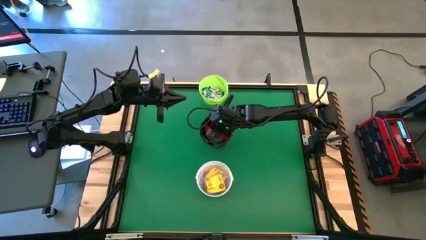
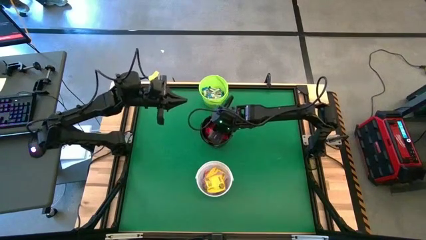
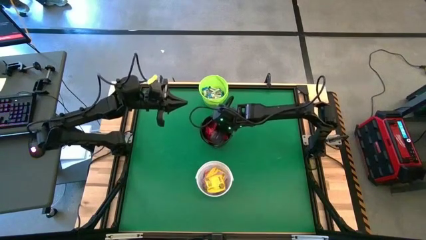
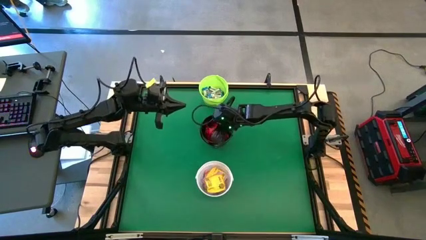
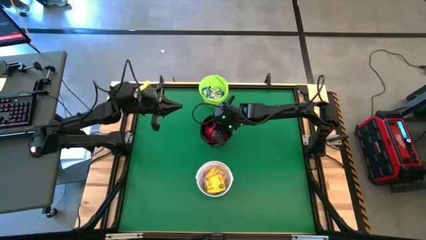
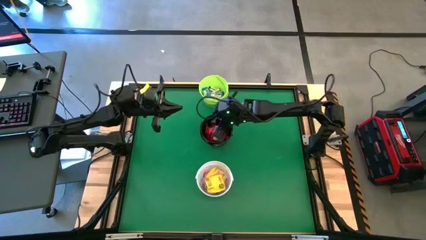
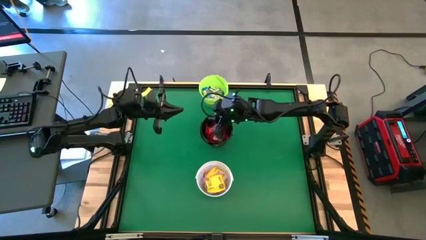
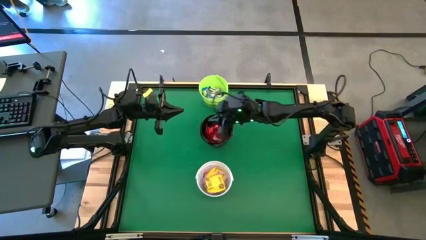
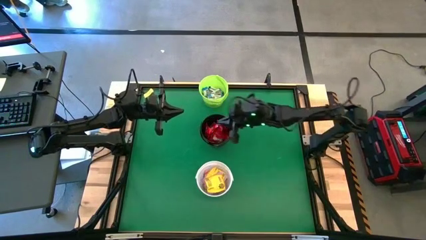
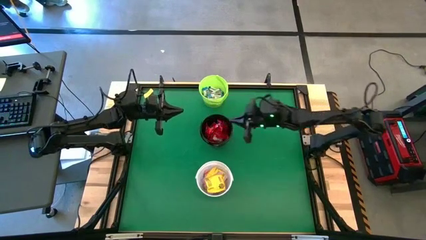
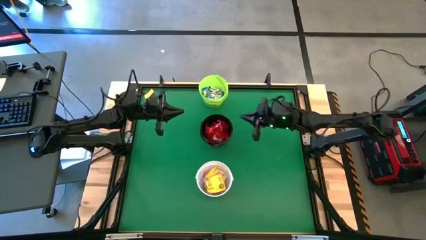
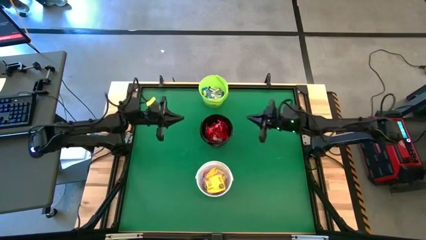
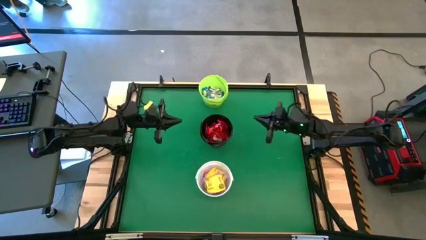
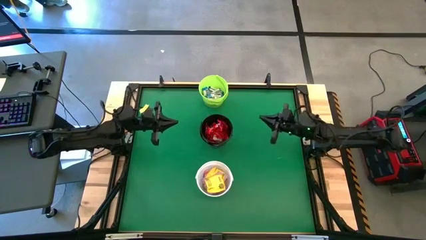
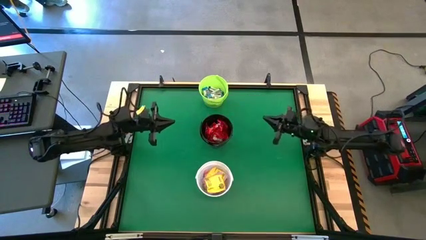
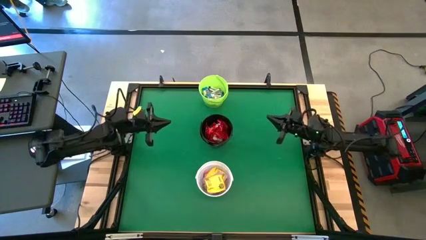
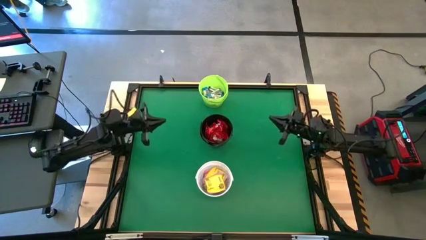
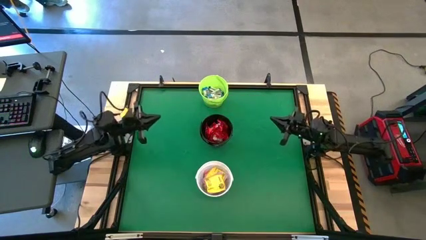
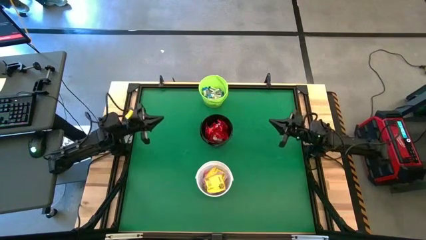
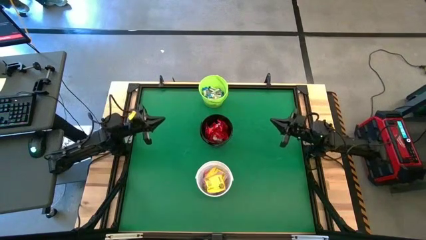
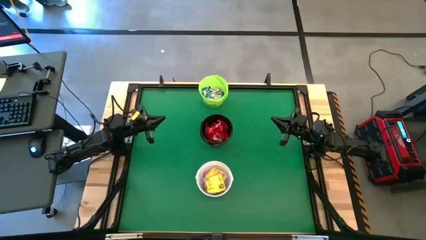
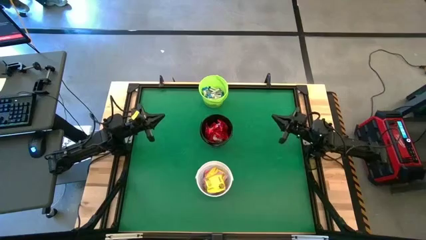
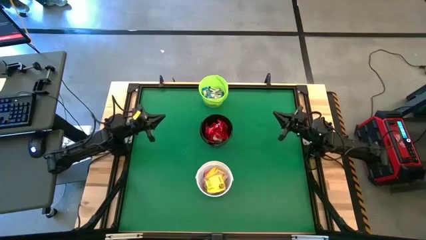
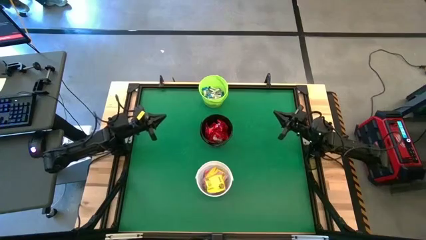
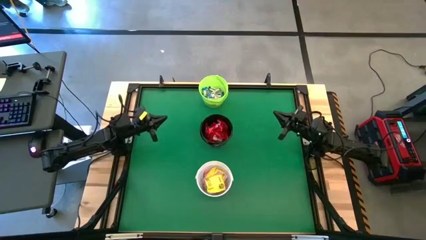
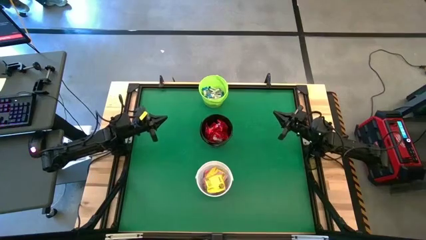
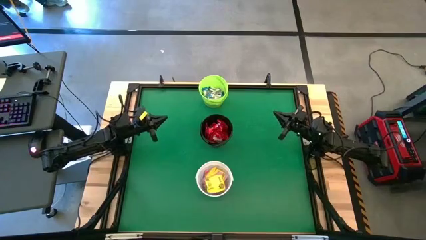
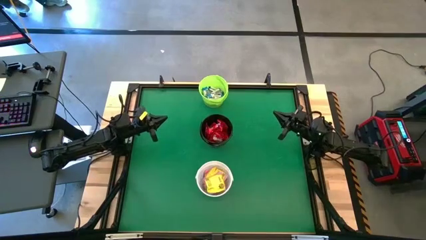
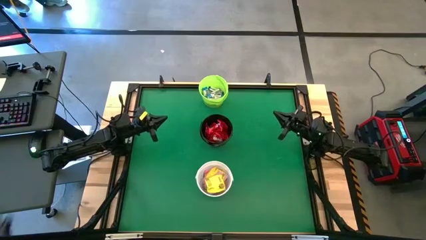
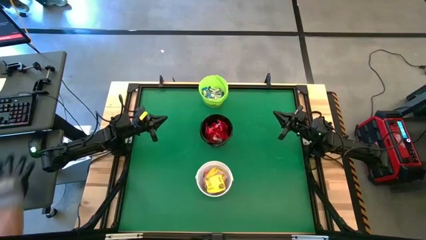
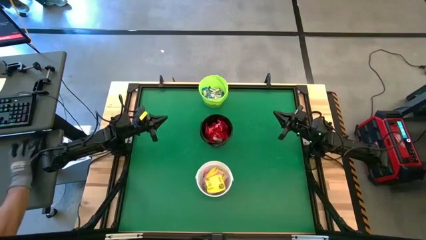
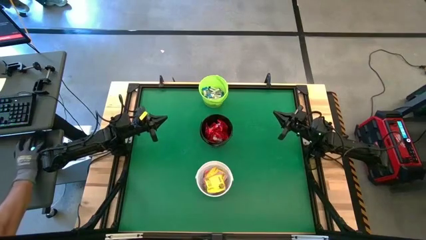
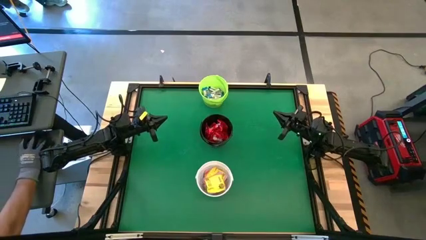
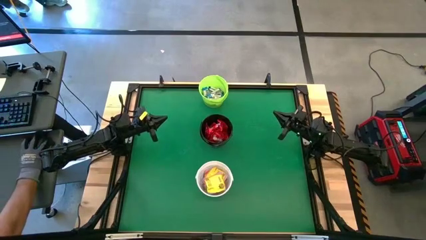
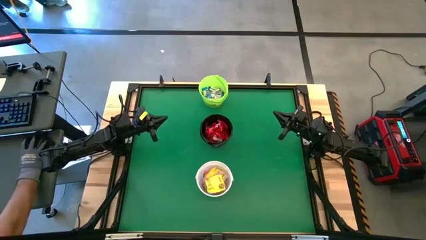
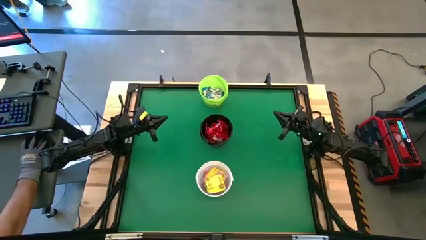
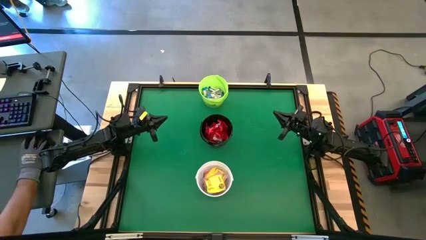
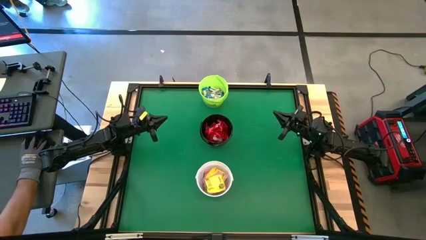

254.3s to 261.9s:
Task: Sort candy by brand, put in halloween buckets
Return to Home Position

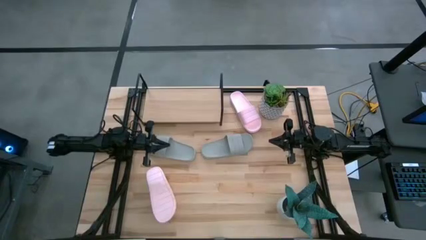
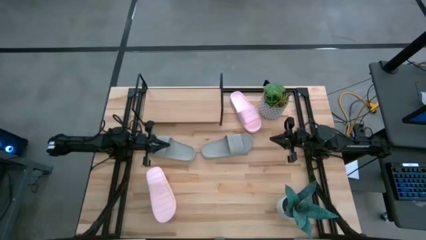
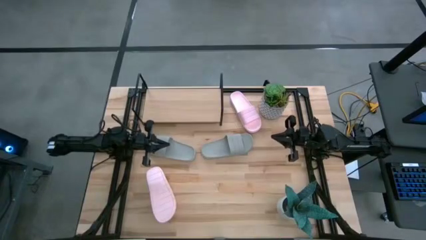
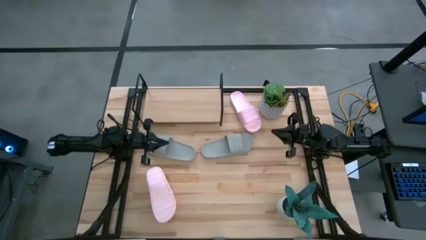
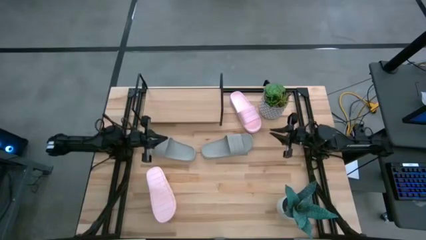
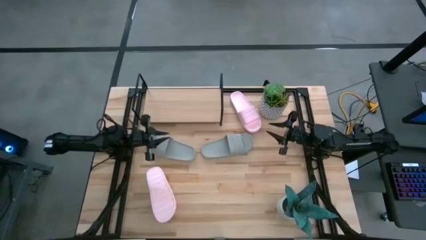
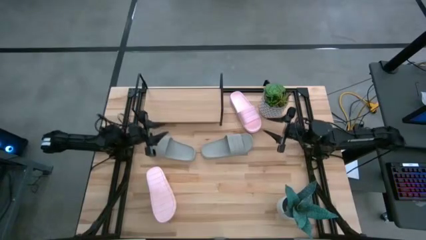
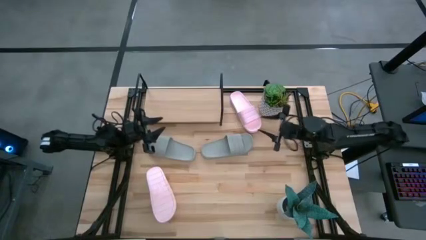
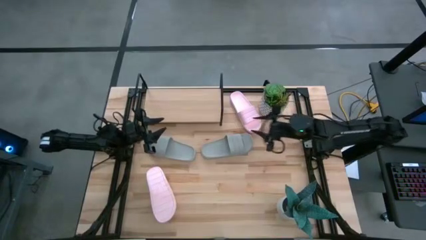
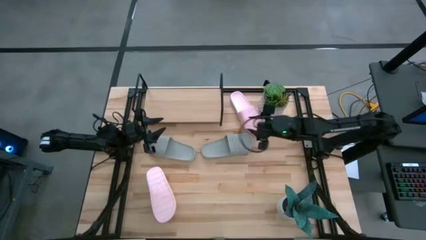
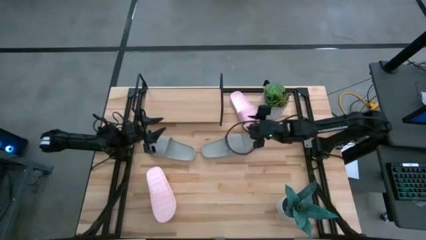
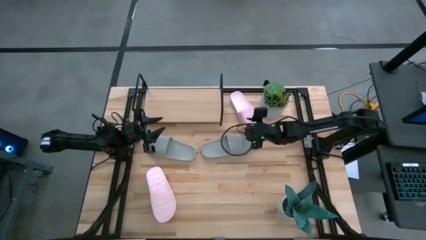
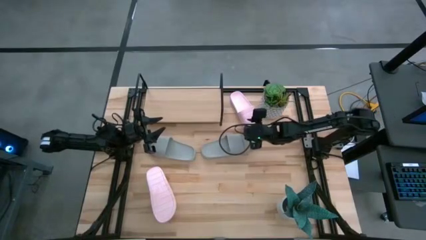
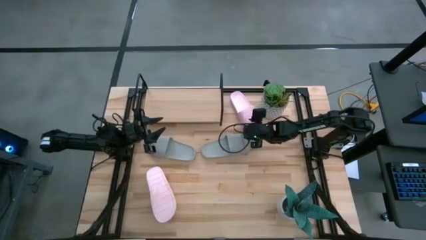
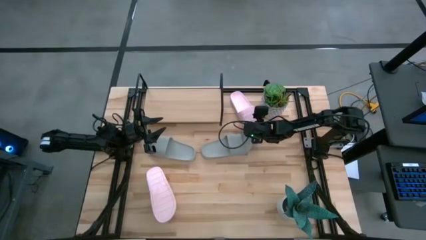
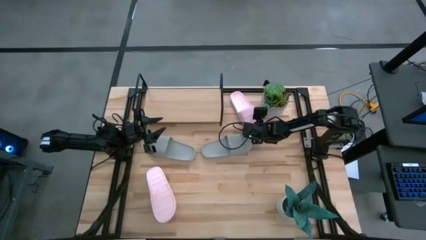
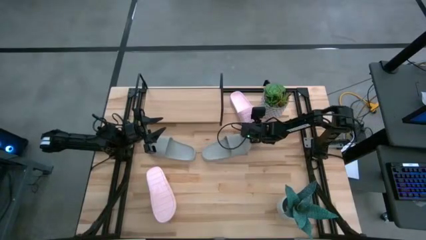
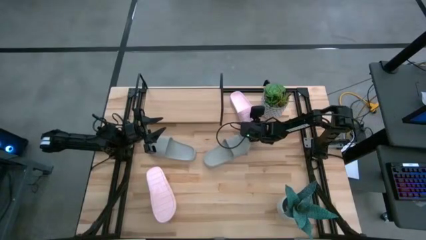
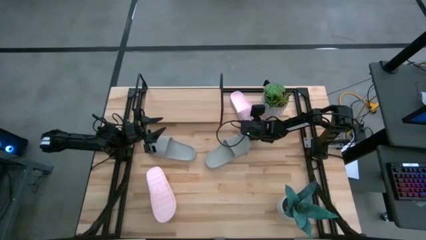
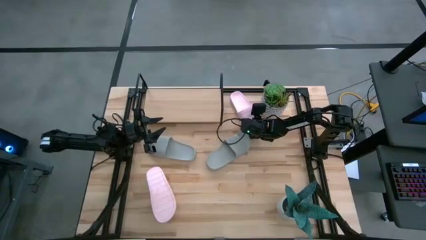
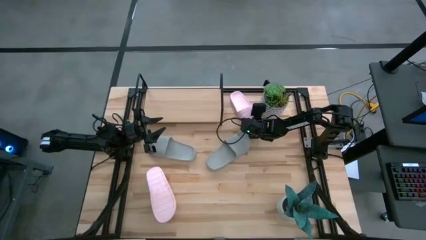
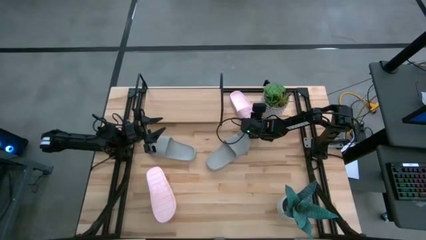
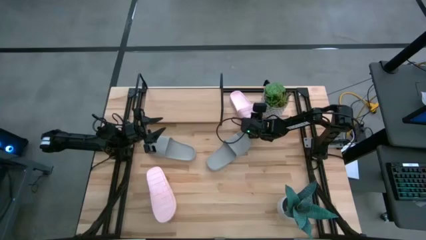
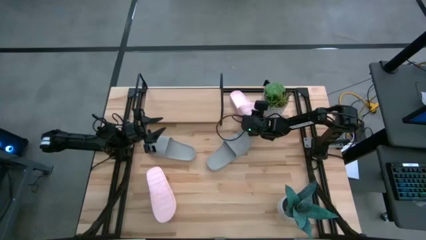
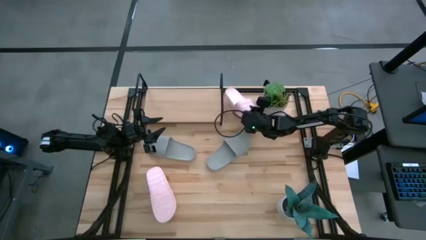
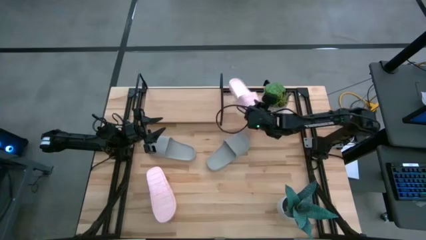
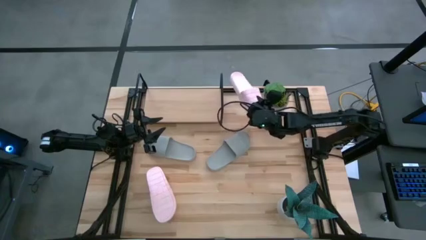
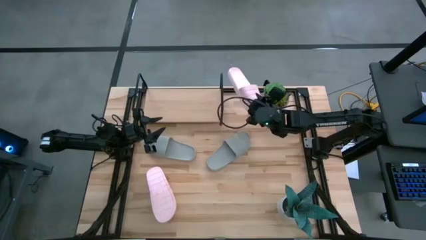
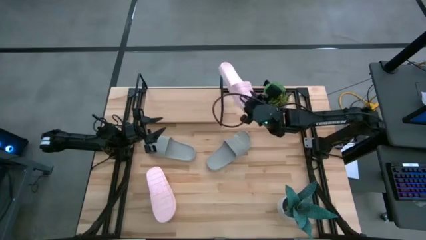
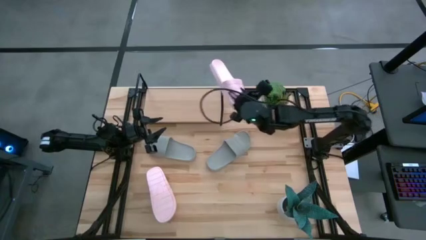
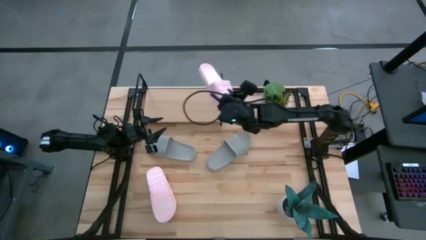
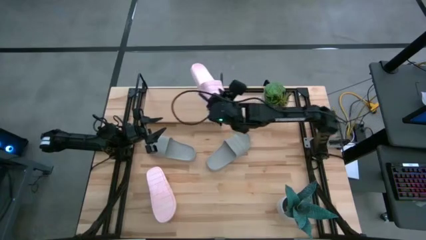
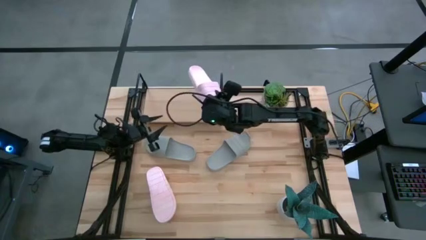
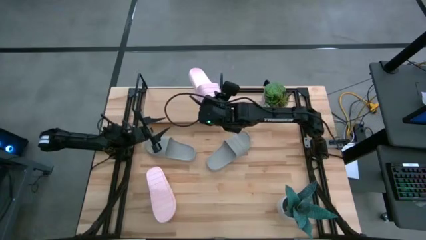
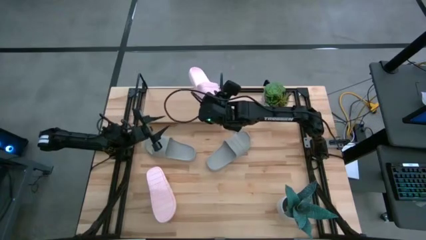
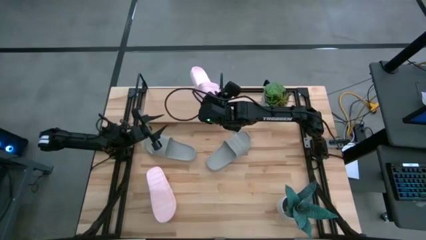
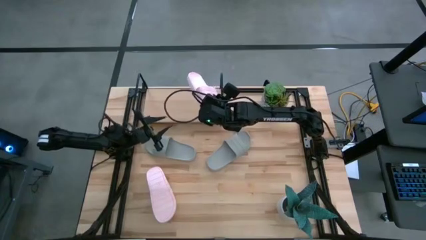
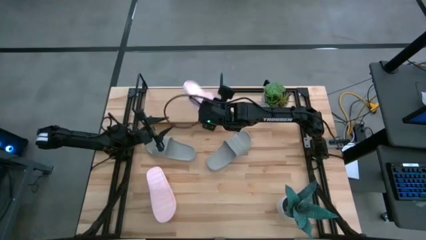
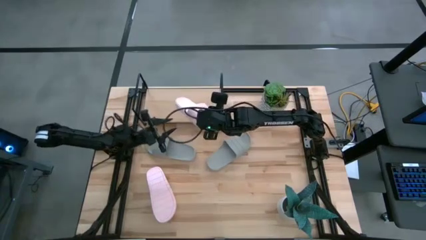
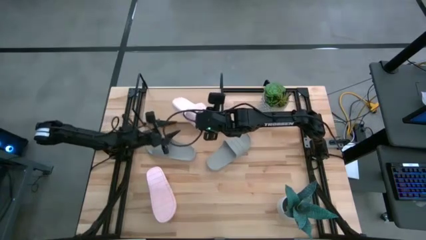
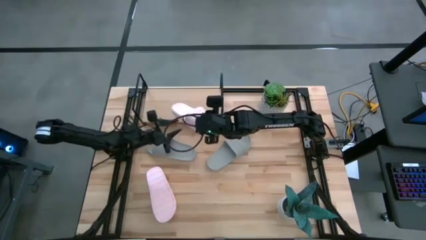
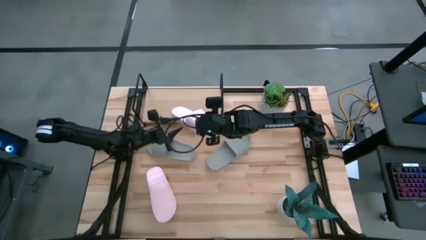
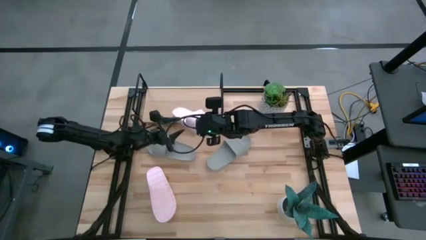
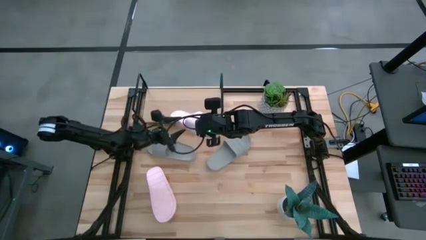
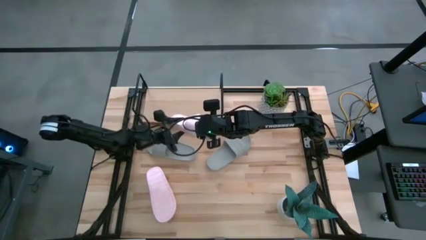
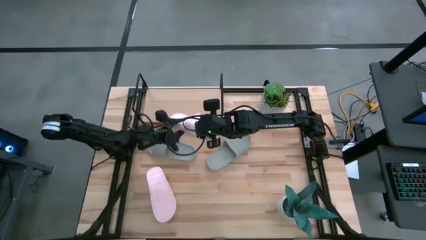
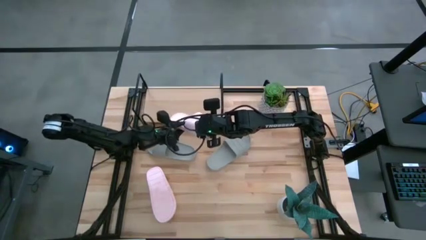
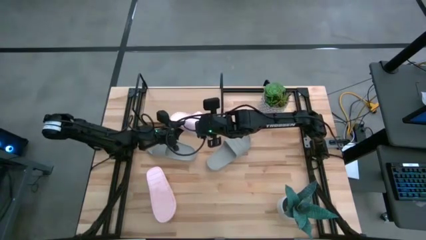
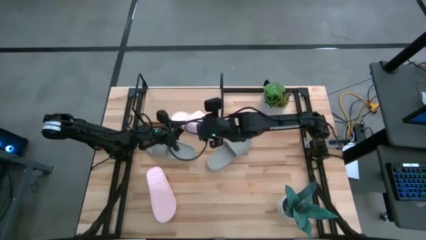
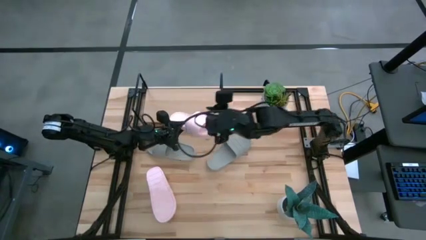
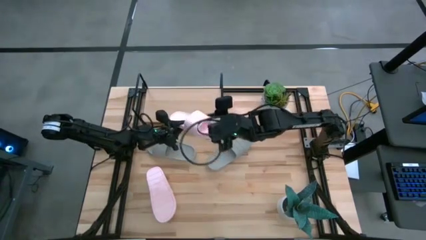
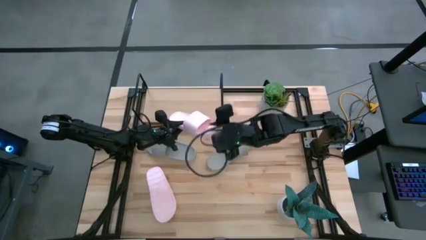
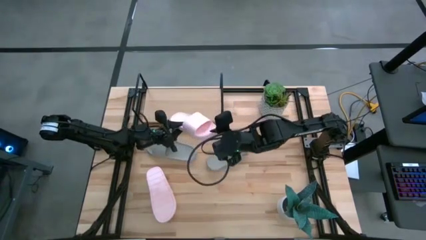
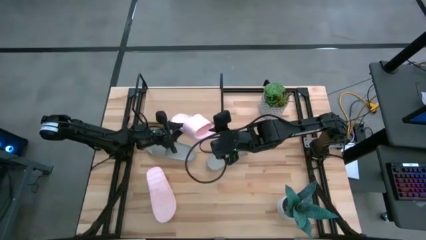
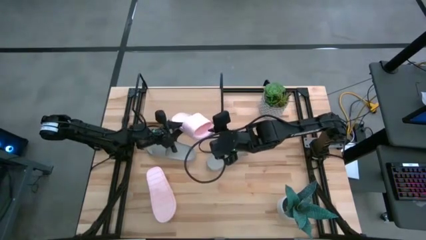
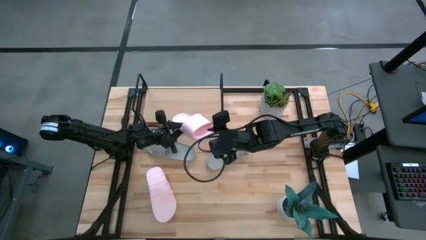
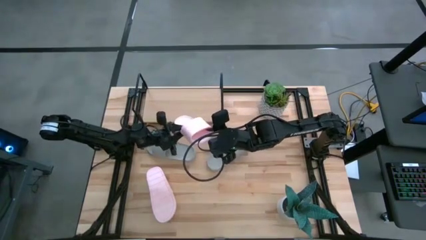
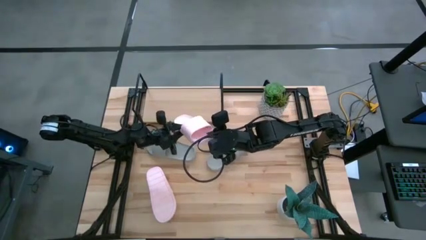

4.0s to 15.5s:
Task: Pick and place slides into the shelf
Put the top pink slipper on the shelf
